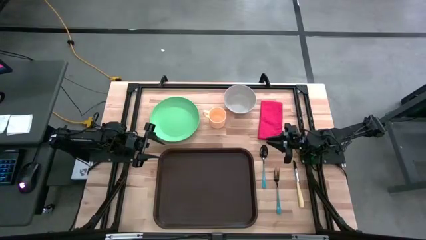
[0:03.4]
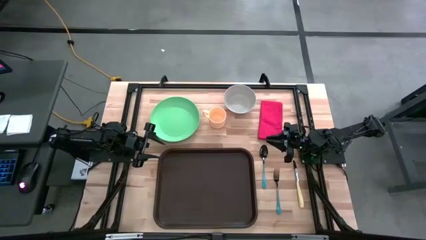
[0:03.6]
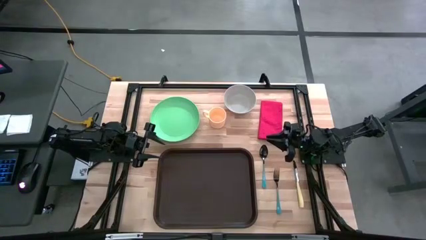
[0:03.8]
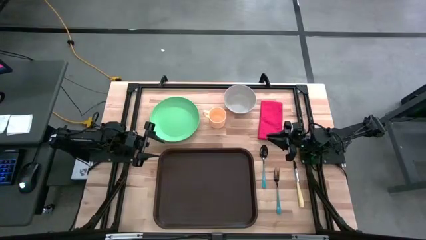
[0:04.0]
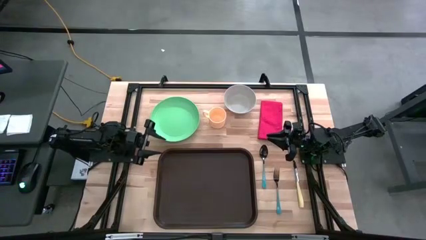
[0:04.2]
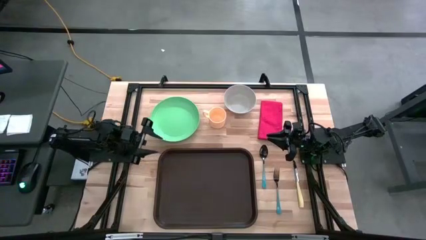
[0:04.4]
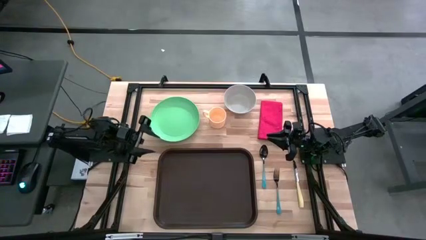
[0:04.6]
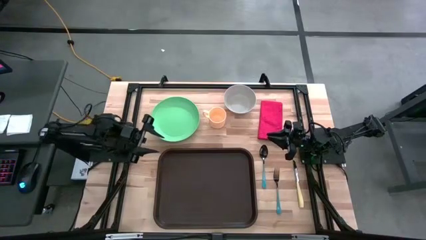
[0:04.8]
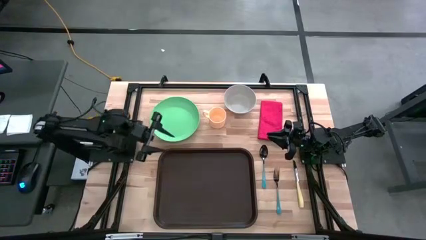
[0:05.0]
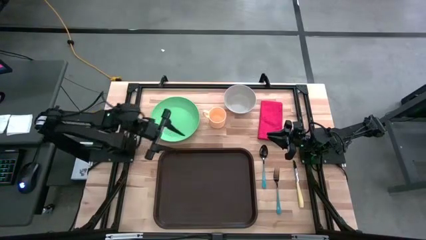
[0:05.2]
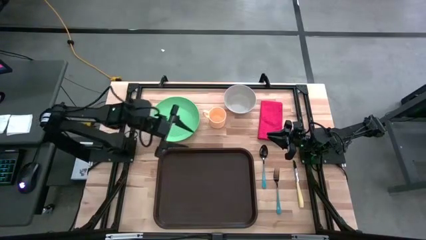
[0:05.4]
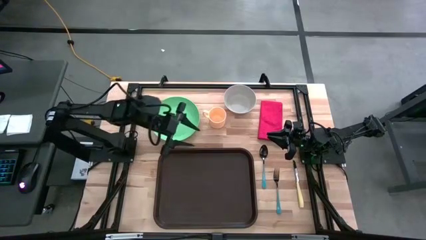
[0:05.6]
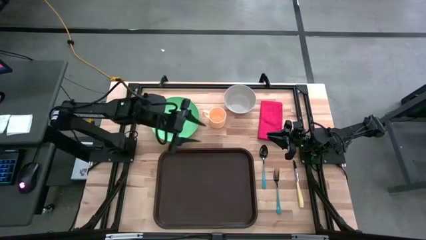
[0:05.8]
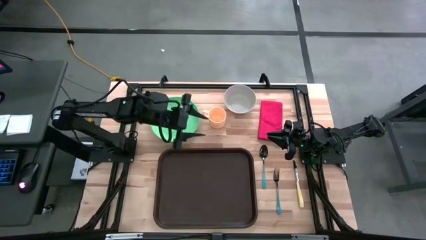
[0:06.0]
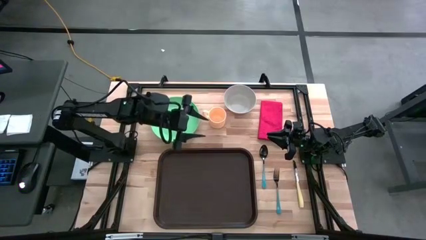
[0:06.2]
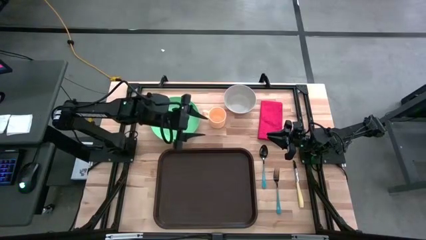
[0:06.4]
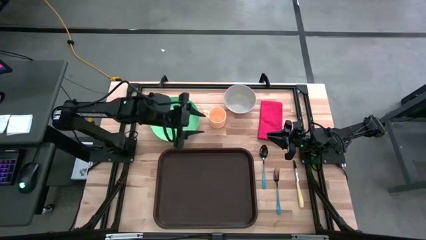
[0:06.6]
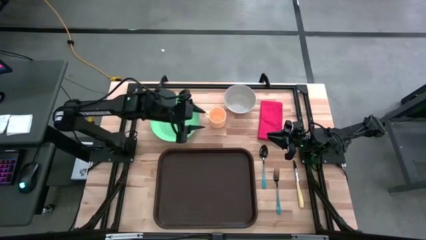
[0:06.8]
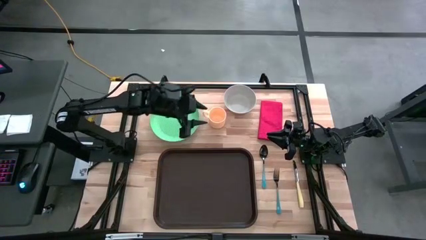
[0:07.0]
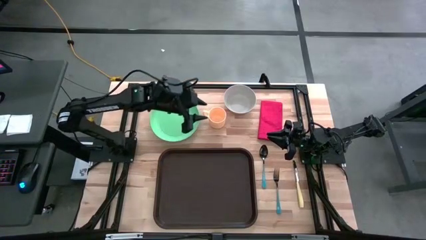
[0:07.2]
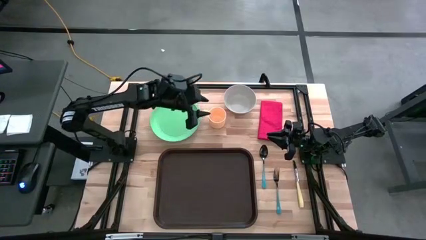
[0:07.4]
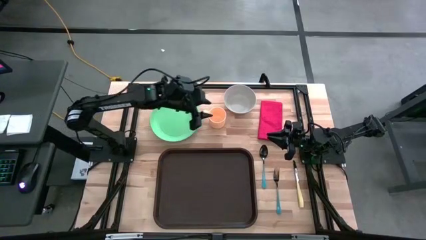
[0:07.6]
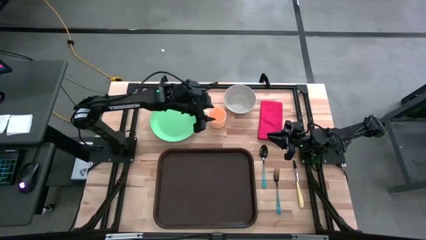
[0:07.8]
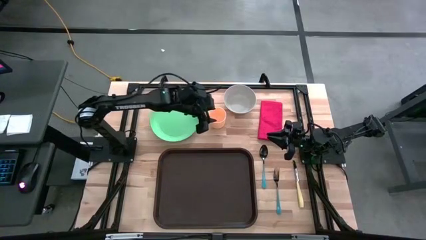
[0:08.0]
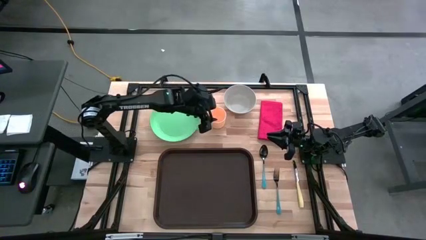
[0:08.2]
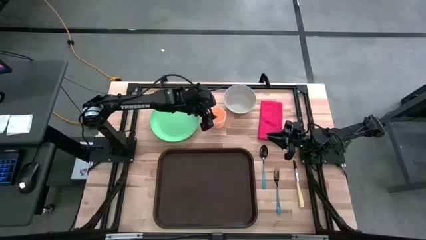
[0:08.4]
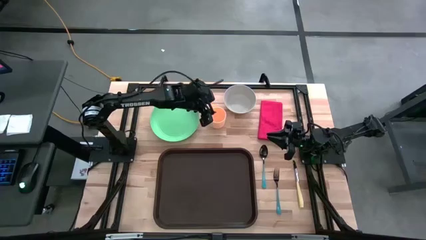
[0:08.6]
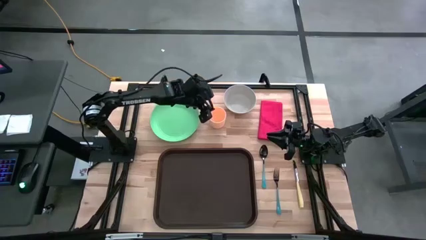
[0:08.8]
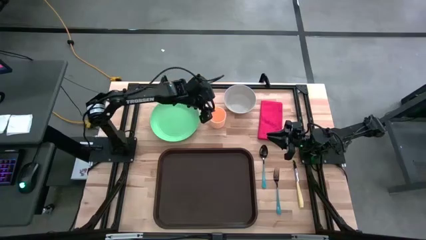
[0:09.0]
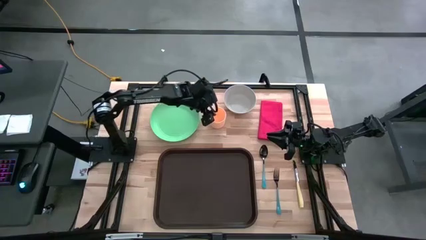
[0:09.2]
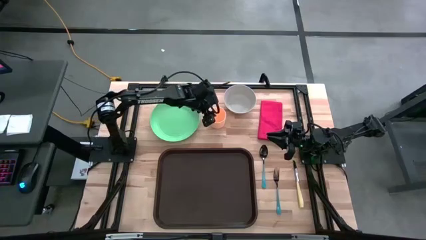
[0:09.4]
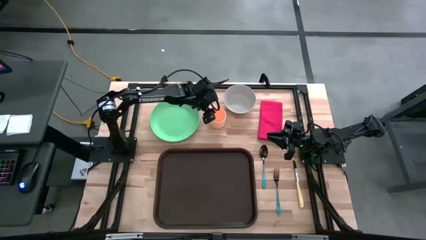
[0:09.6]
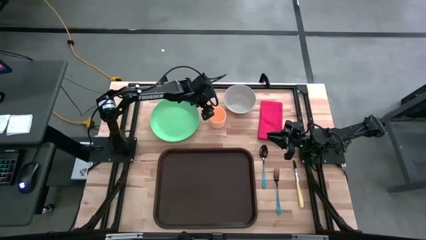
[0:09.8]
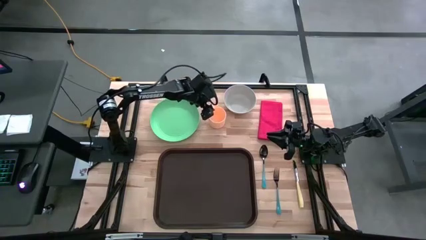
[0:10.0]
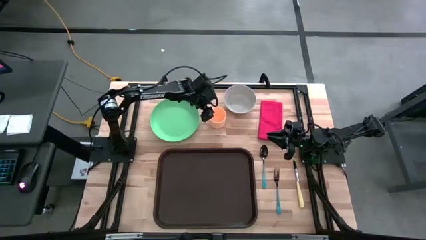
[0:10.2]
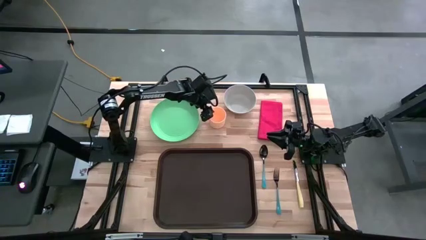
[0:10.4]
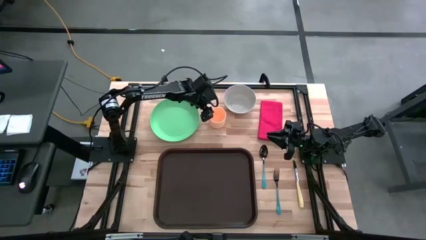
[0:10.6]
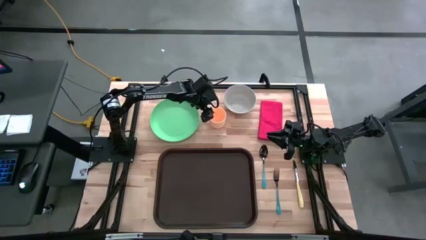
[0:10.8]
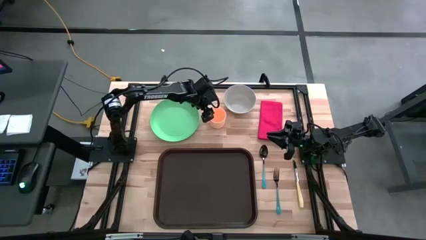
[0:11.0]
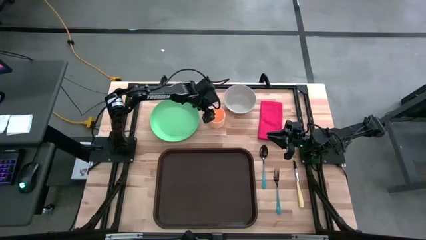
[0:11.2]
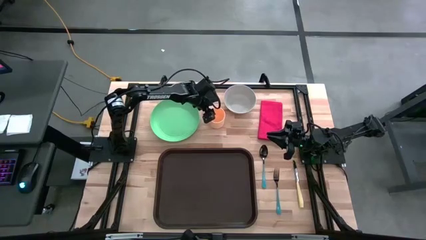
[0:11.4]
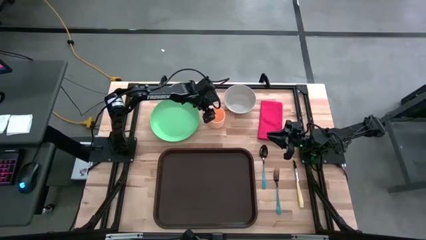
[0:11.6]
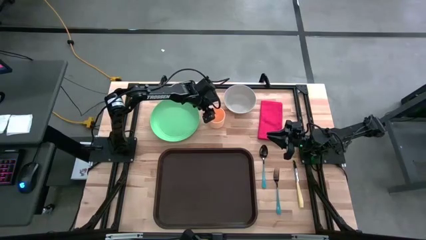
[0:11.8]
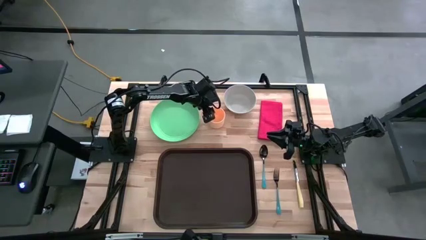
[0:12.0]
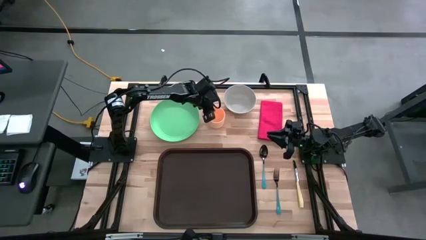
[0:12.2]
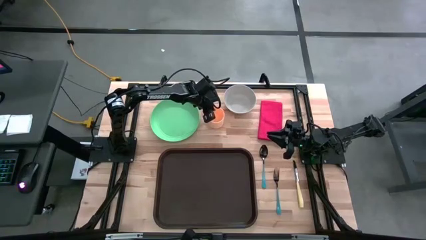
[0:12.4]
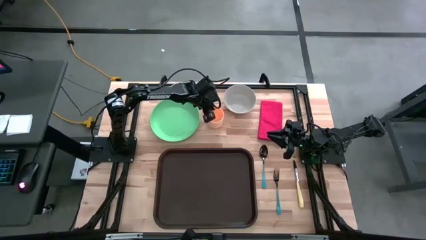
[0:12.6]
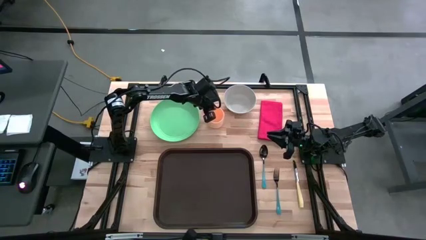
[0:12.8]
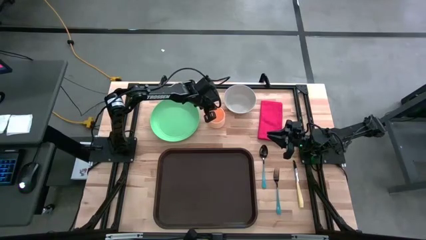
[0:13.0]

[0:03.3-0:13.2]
Task: Set up tray
Put the orange cup on the brown tray

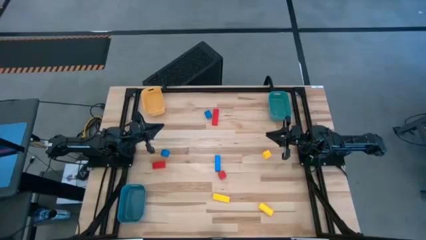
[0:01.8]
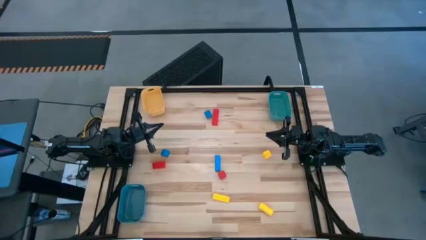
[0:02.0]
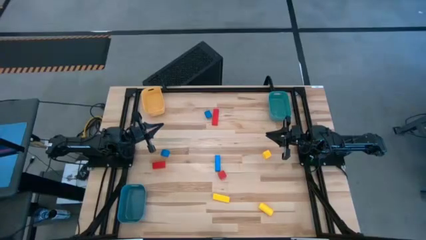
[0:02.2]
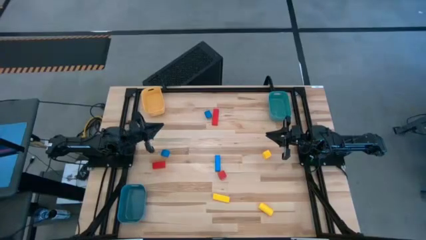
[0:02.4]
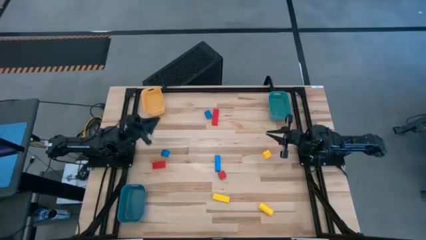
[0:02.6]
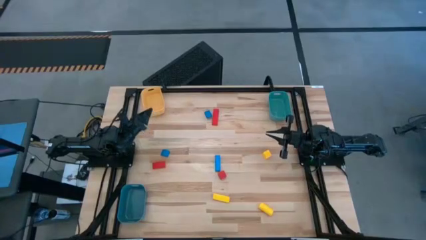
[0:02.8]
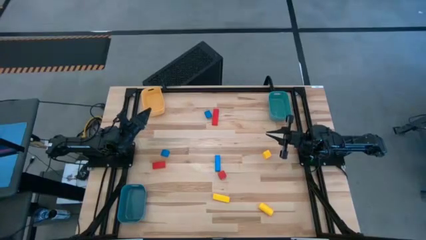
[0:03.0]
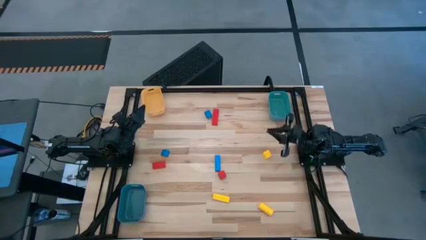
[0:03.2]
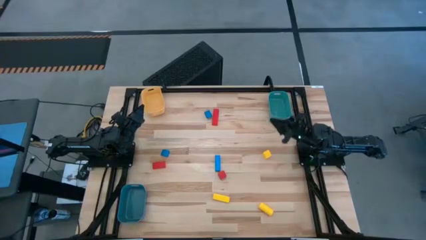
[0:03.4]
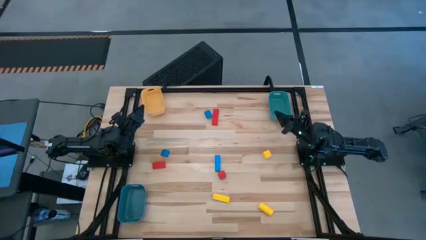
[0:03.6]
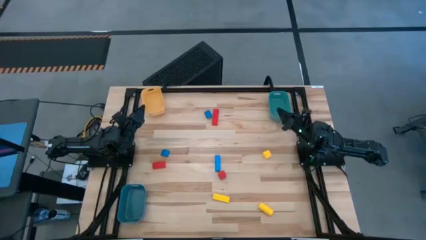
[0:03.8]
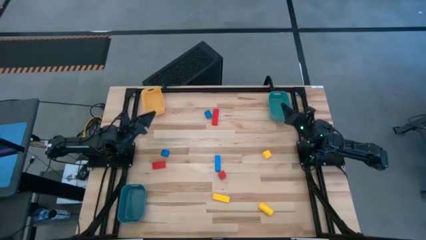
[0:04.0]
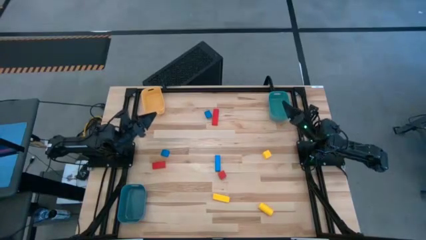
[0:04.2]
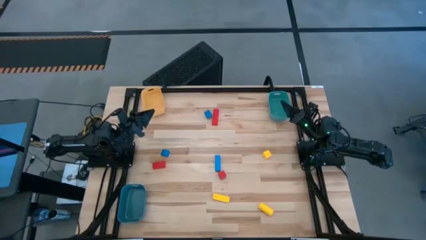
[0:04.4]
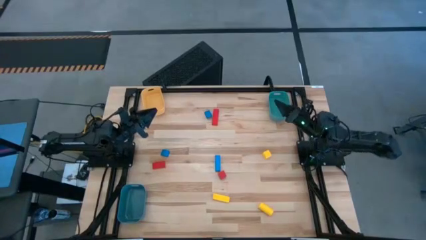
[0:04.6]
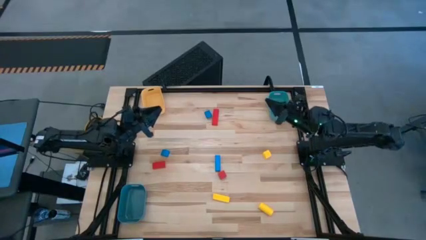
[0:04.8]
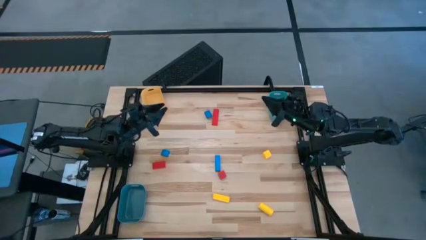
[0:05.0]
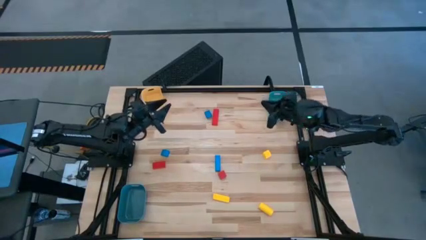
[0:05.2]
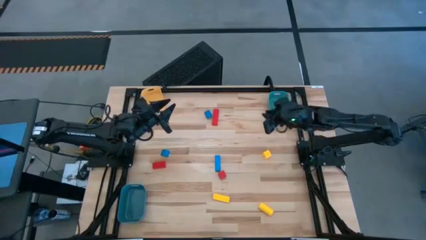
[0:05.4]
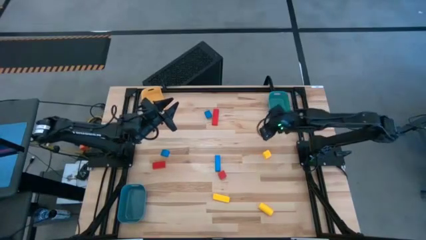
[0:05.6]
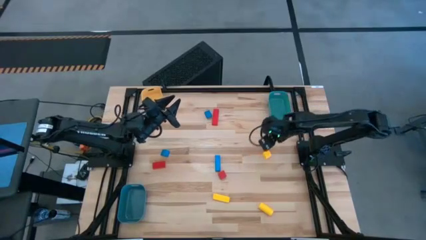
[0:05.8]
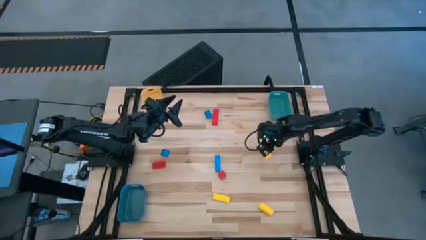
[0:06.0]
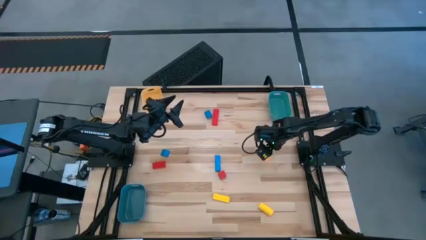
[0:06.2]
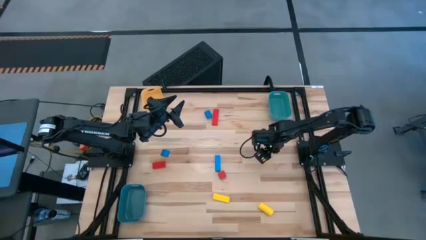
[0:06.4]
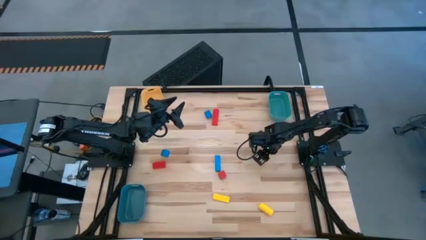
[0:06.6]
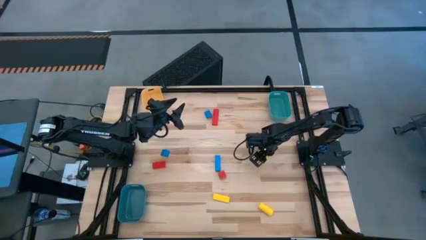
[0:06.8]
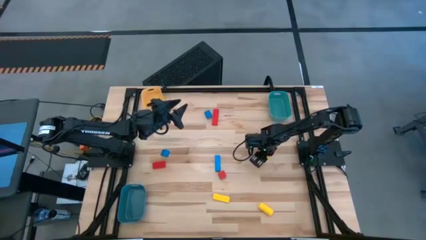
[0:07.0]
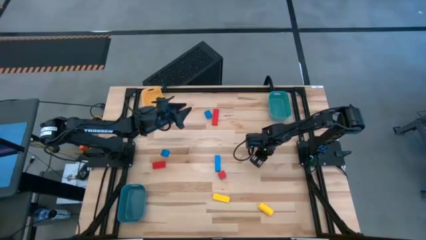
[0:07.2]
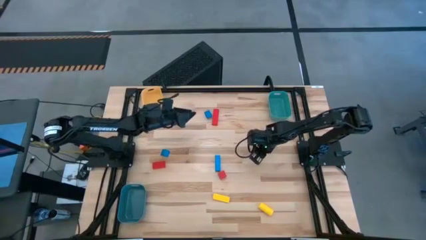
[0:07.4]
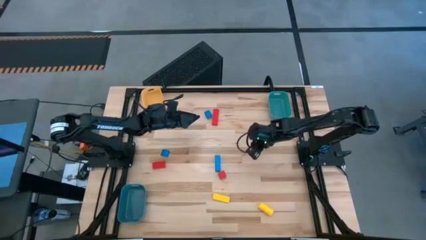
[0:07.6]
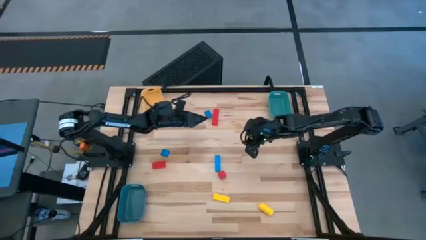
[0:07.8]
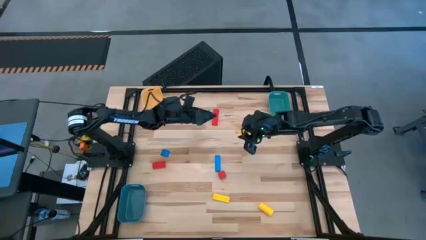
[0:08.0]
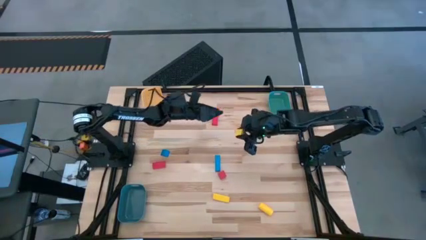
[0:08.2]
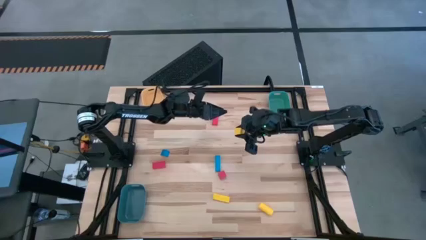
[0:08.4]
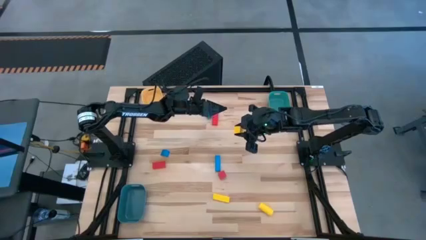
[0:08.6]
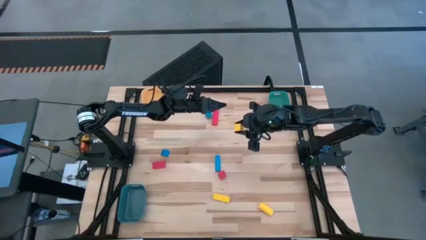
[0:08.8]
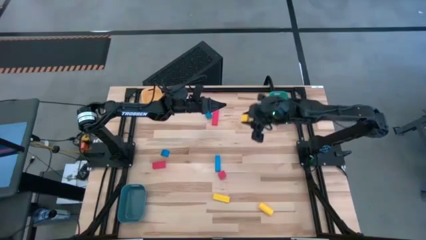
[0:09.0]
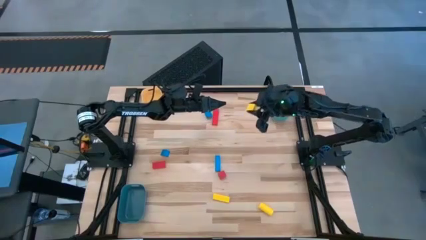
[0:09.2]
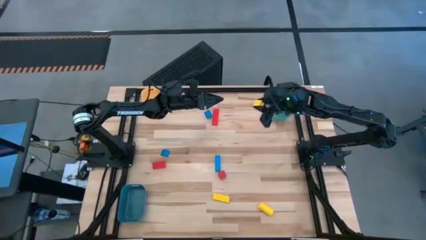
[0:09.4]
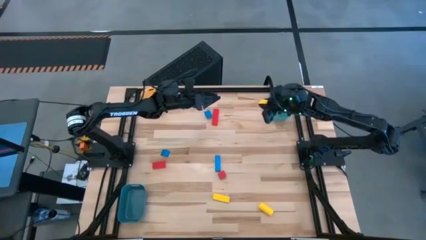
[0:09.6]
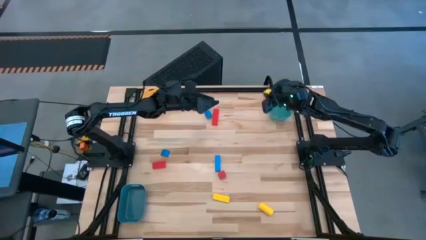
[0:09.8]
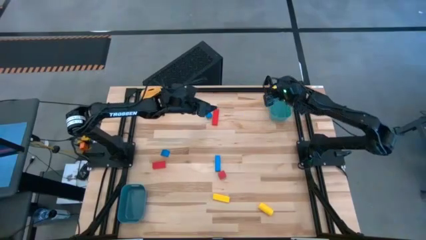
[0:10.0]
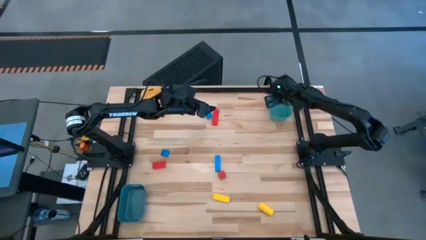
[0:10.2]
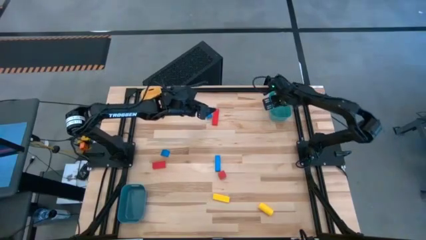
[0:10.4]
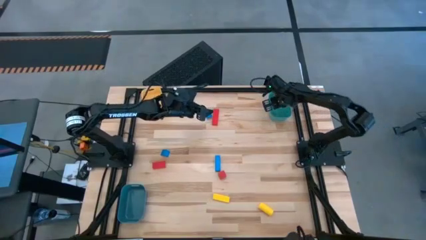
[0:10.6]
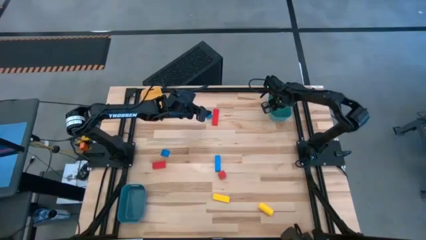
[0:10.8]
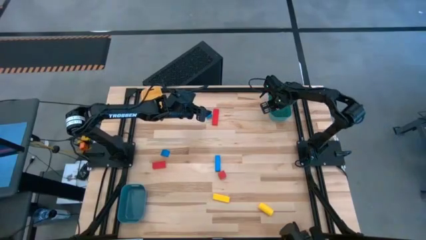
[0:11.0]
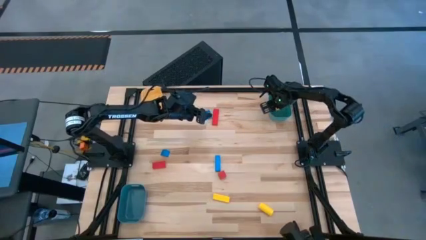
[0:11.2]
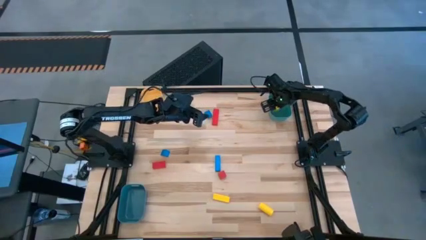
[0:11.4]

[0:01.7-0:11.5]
Task: Sort & place blocks by color
Put the top right yellow block into the light blue bin
